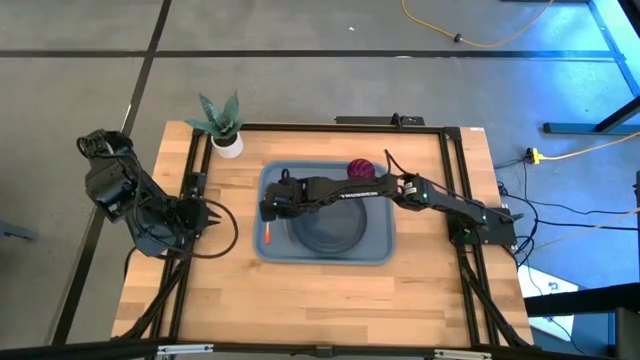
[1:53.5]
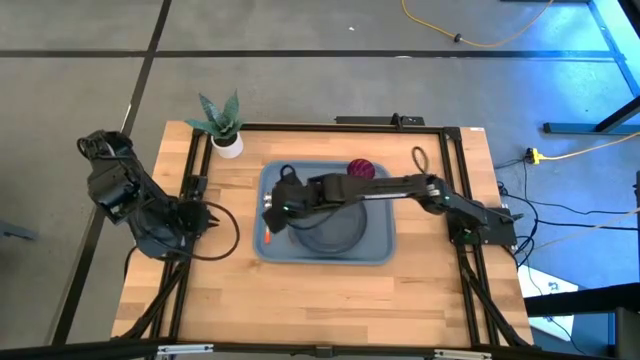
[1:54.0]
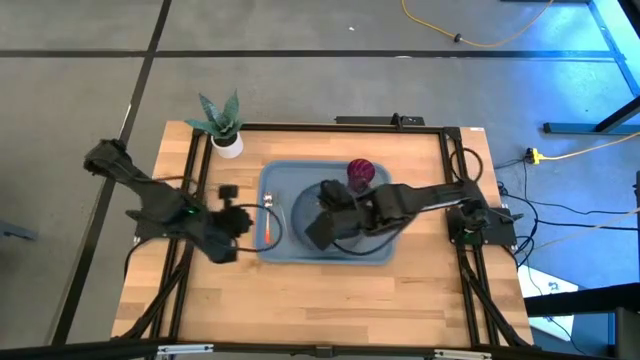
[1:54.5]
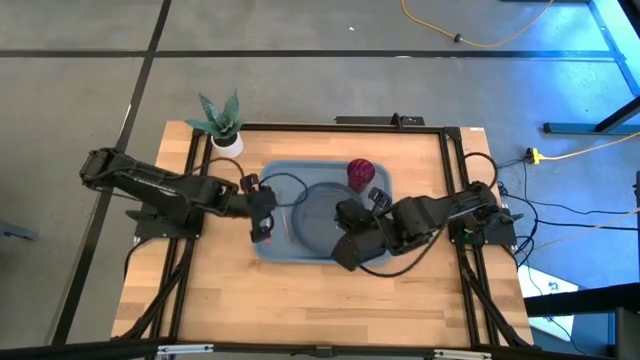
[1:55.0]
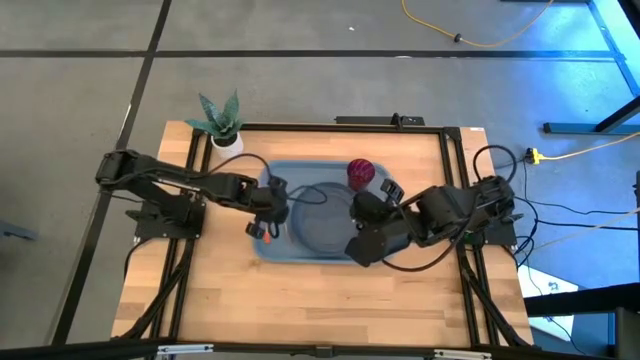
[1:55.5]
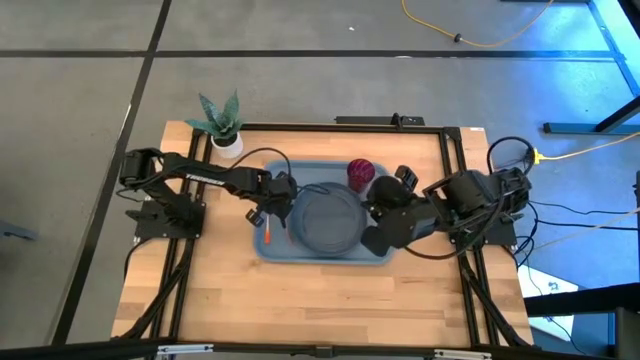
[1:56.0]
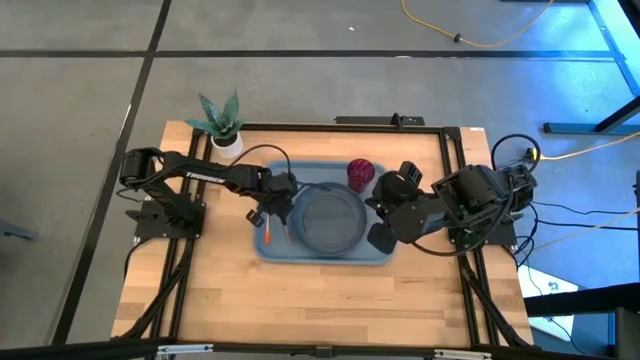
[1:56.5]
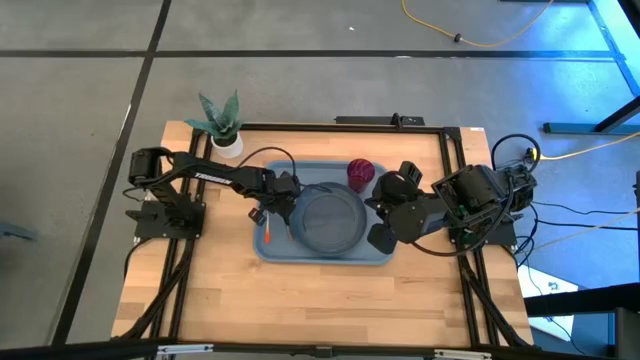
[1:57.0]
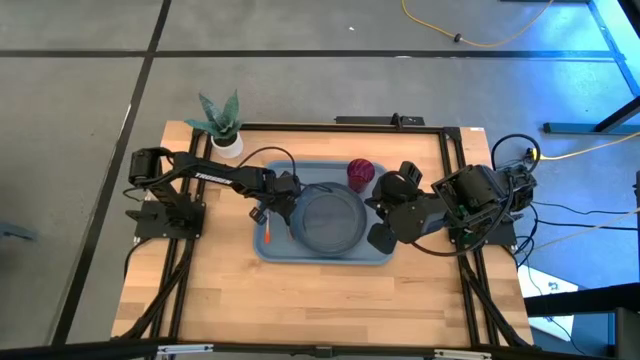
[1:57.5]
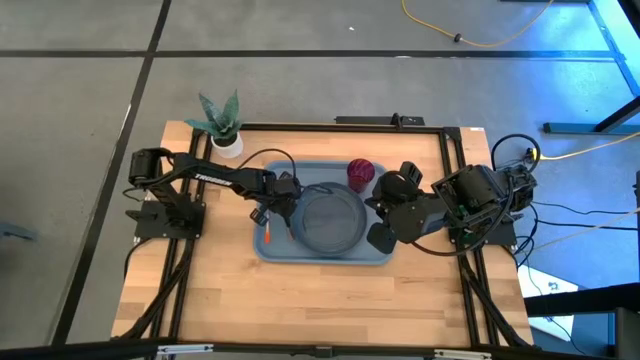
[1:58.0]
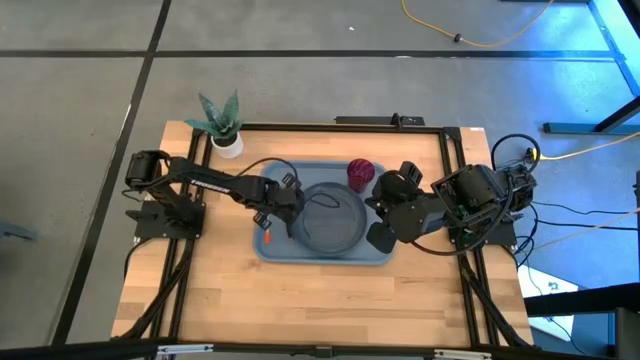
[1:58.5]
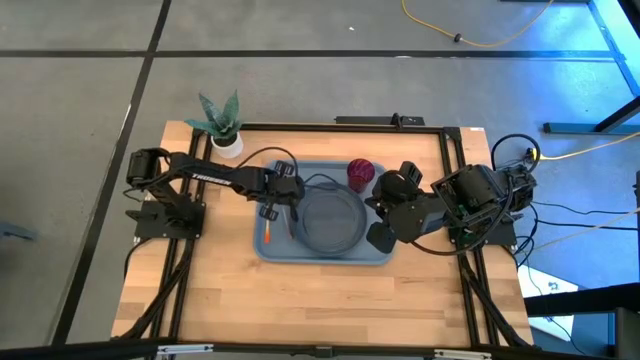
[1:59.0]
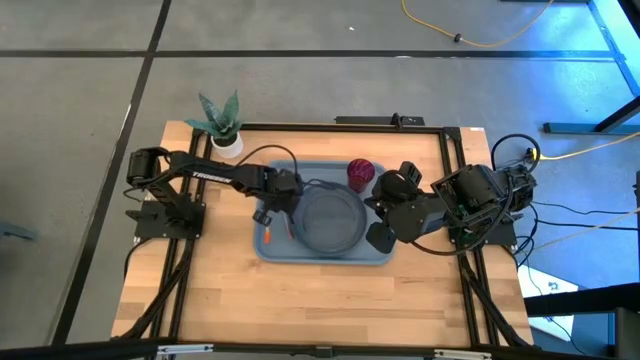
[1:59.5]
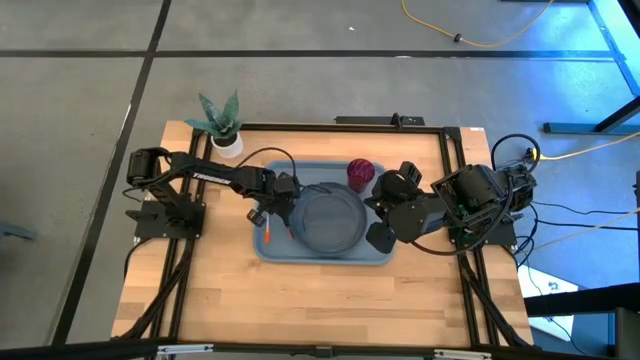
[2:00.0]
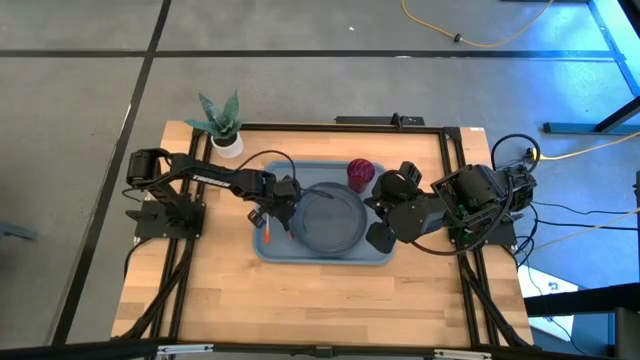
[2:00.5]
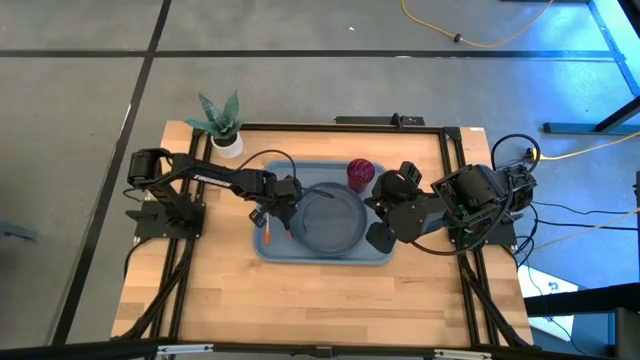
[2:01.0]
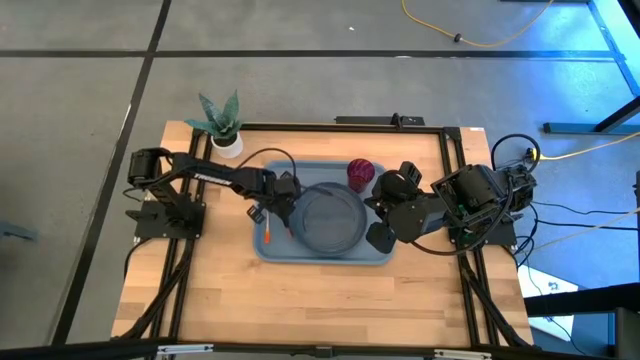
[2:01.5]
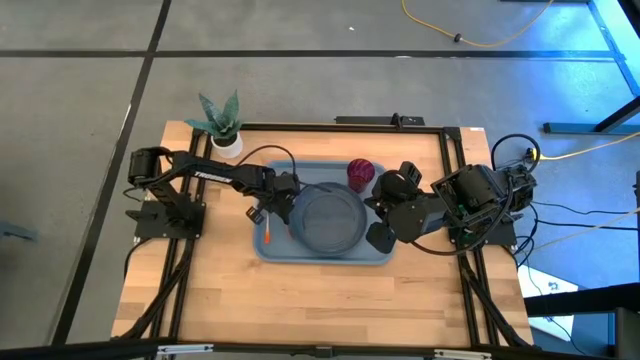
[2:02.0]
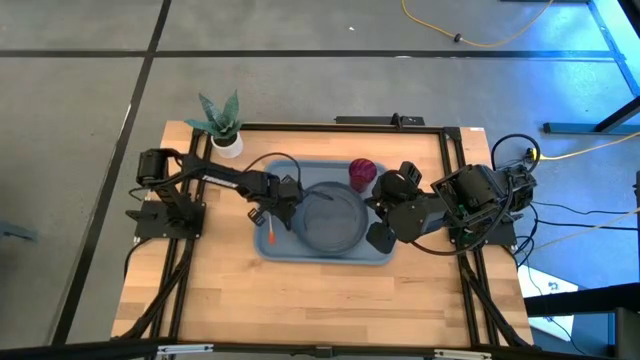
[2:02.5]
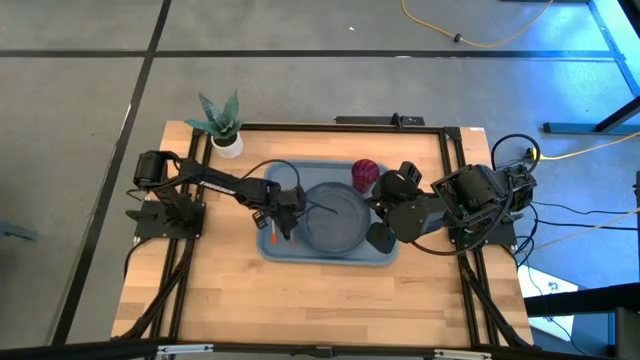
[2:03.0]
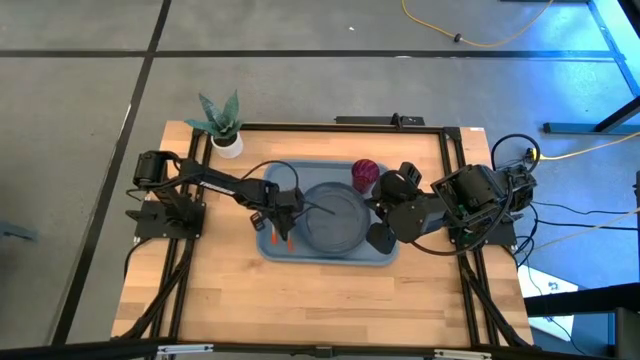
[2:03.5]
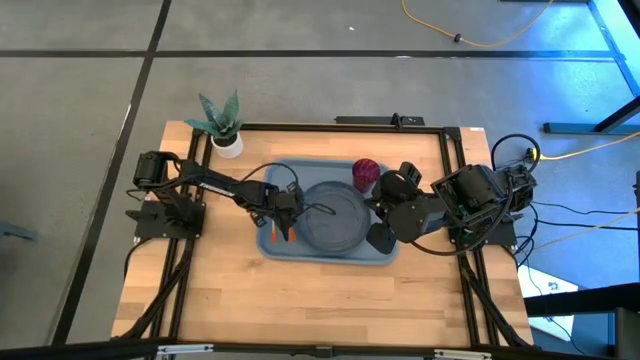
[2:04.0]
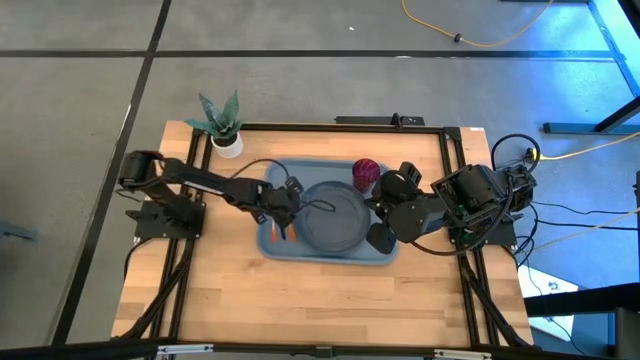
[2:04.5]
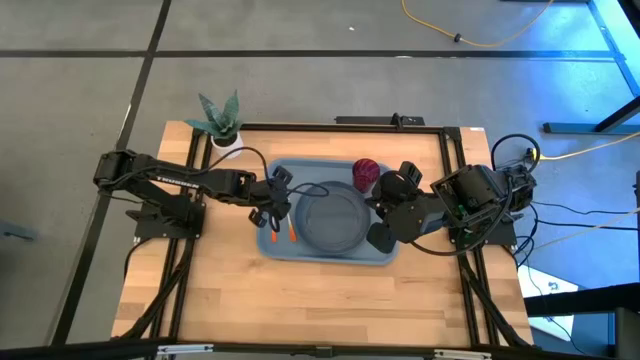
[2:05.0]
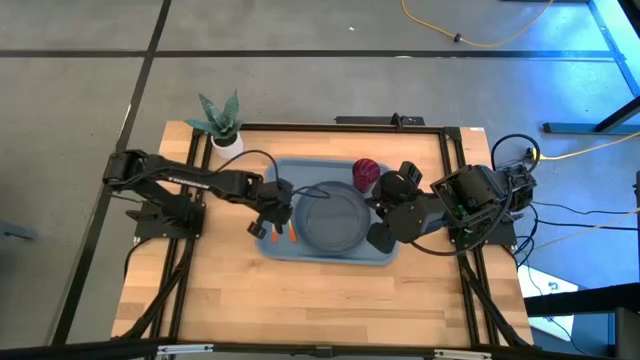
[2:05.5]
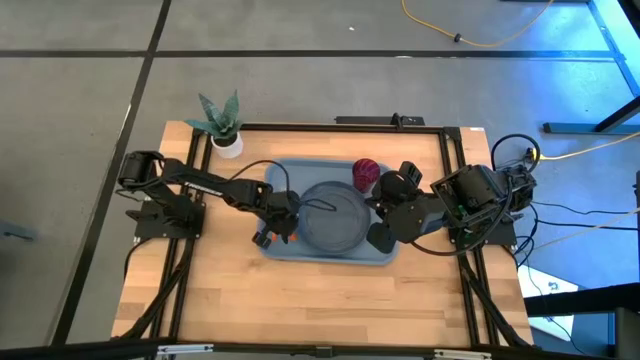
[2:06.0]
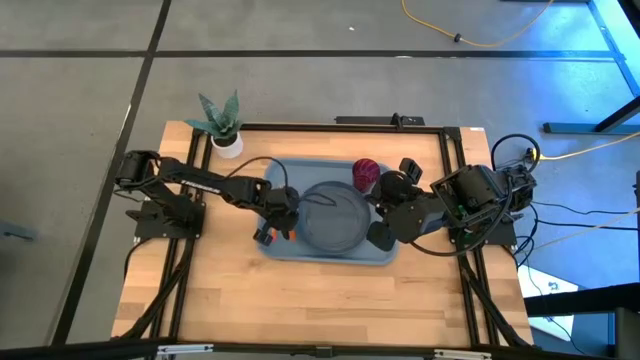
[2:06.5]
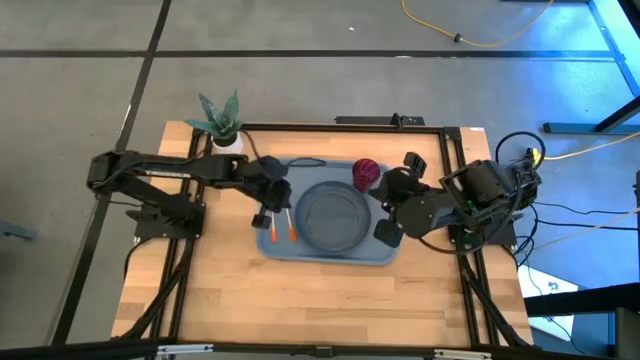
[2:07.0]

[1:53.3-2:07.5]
Task: Pick and place plate/cup/fork/spoon on tray
Adjust the orange fork on the blue tray

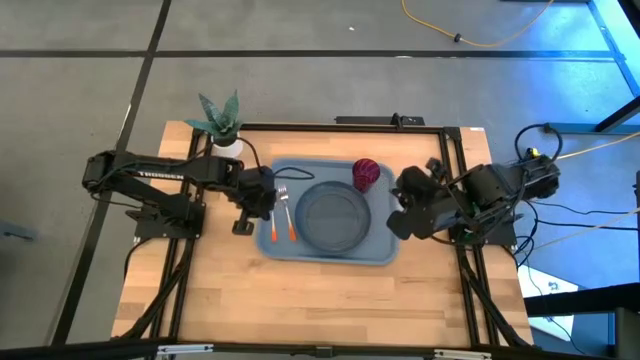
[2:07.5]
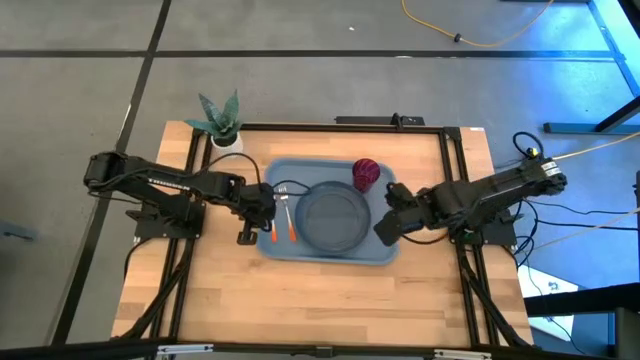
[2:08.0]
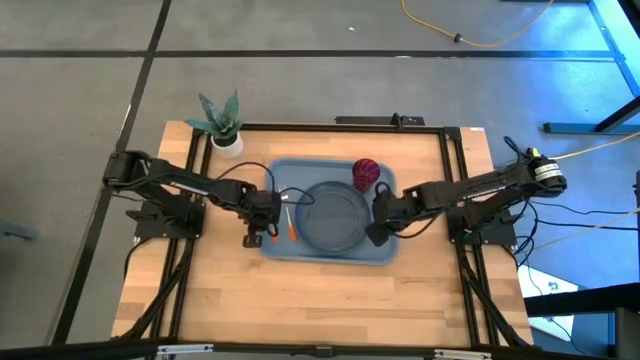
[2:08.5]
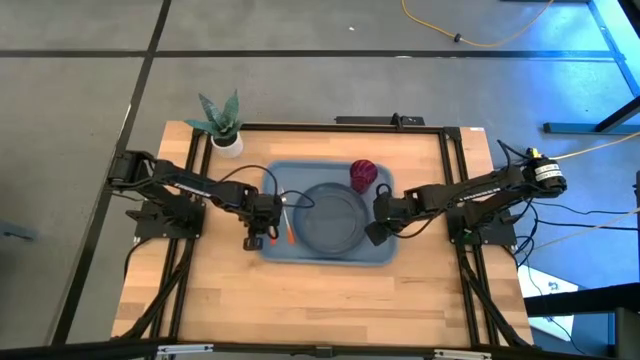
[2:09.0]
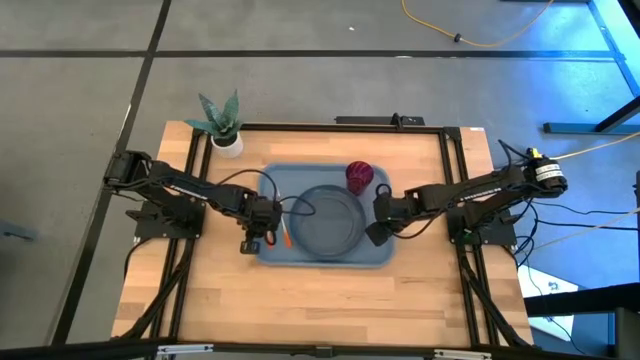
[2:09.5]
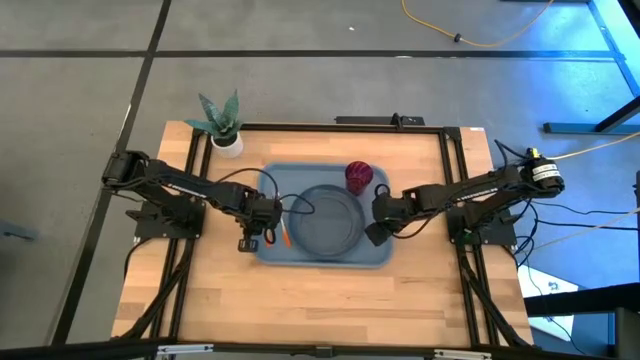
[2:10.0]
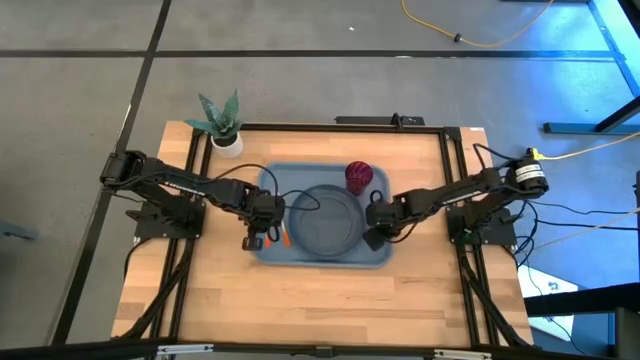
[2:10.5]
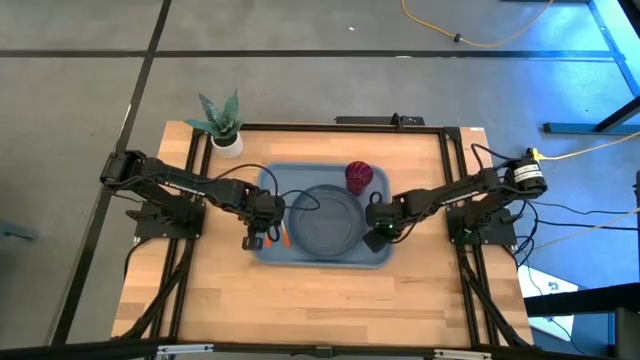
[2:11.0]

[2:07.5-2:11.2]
Adjust the blue tray on the table

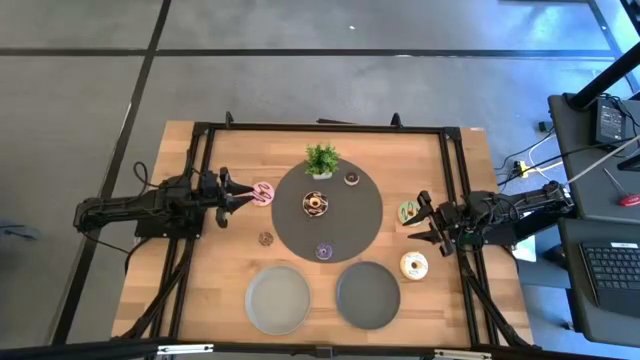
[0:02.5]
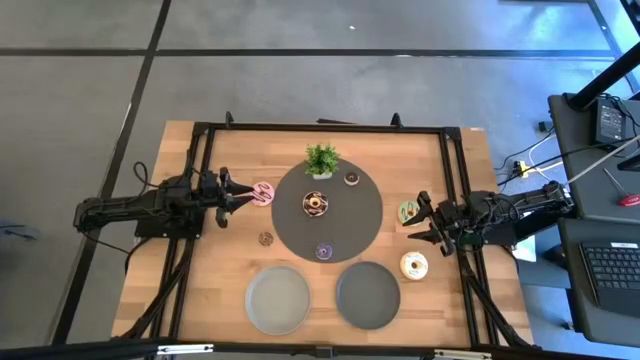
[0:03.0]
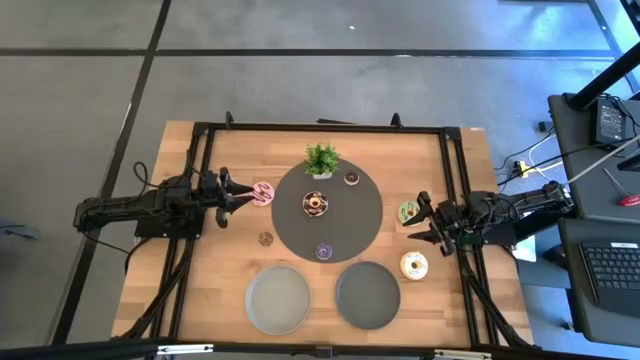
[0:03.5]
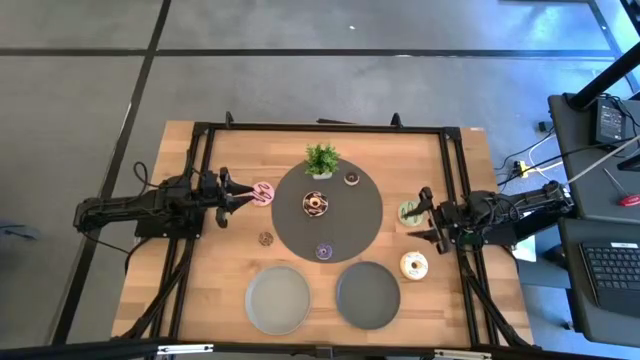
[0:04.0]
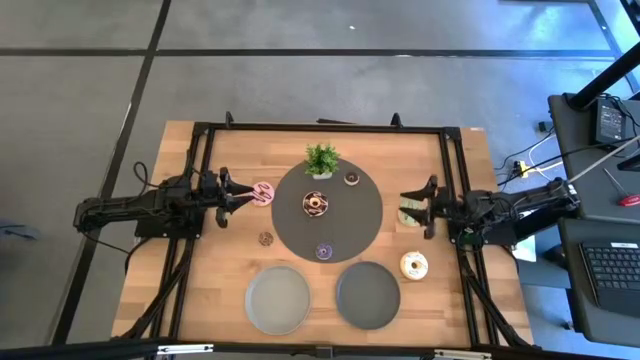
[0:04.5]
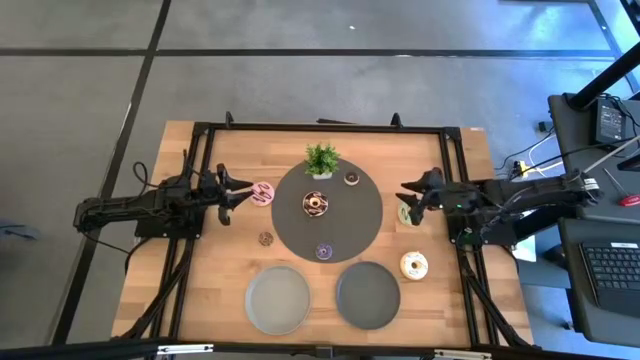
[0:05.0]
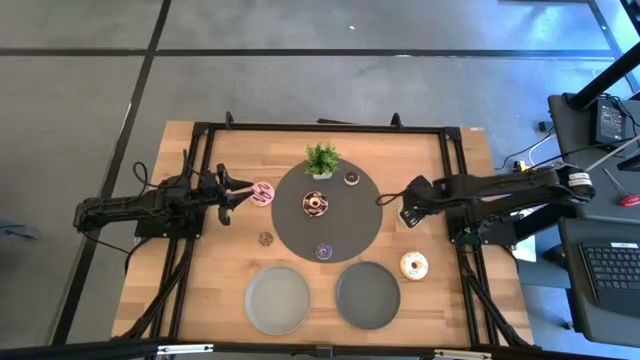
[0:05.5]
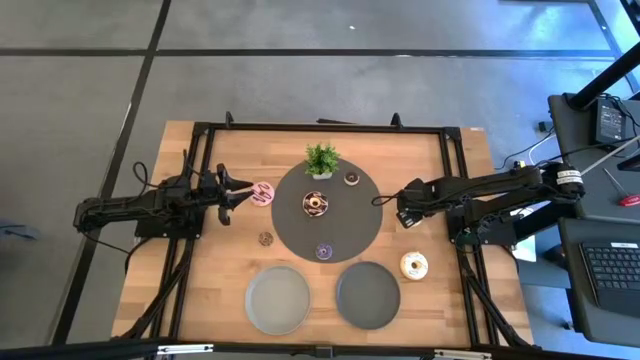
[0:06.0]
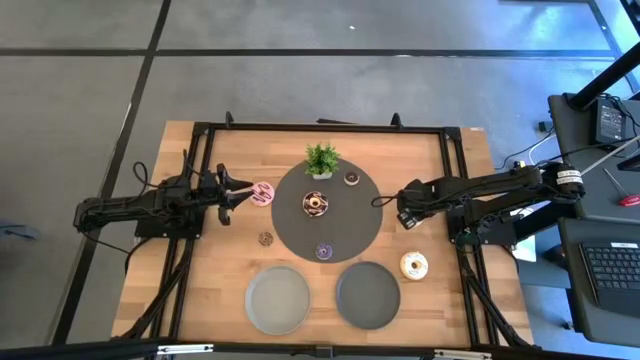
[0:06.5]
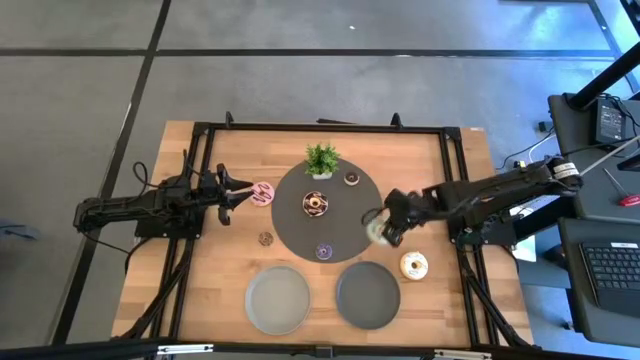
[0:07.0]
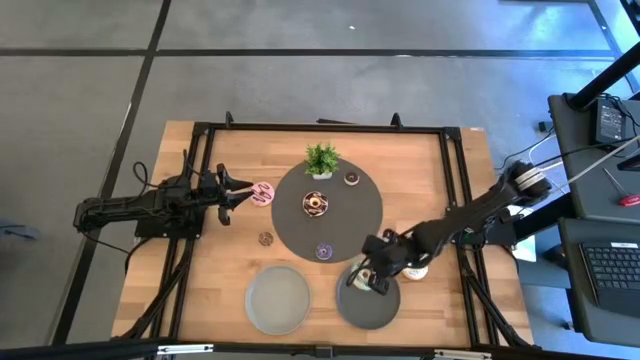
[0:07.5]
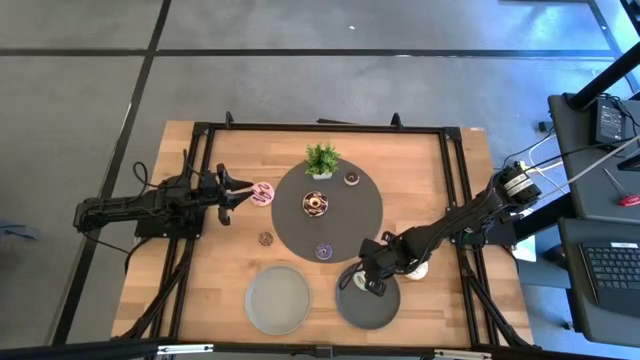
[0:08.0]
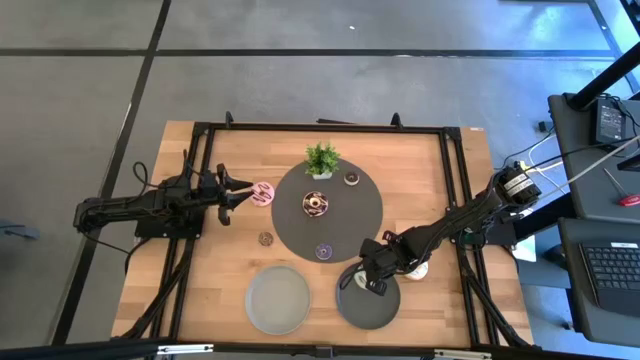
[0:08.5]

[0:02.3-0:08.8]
Task: Pick & Place donuts
Put the big blue donut on the black plate
